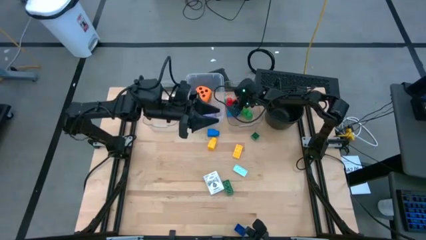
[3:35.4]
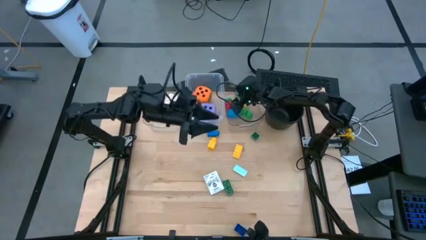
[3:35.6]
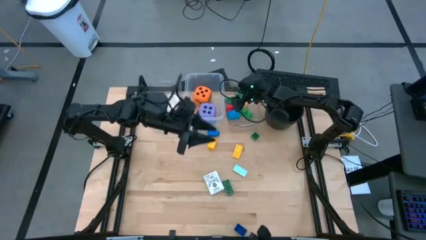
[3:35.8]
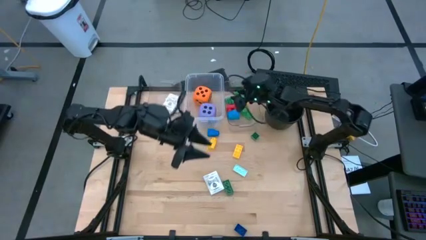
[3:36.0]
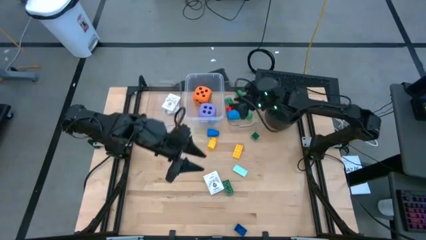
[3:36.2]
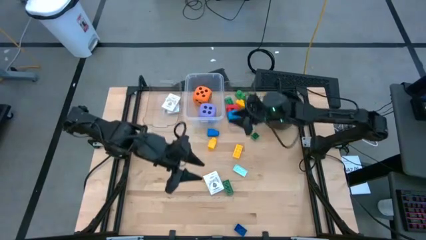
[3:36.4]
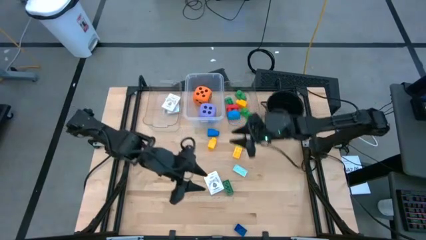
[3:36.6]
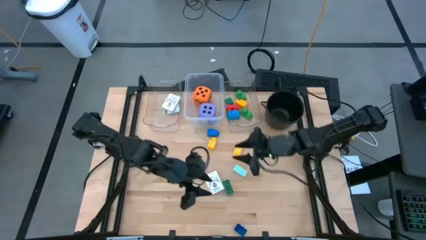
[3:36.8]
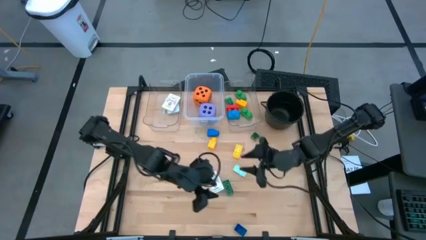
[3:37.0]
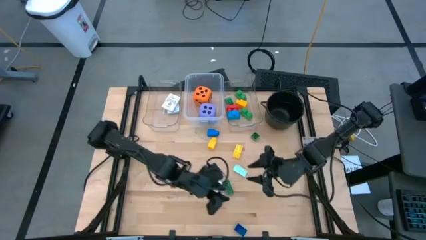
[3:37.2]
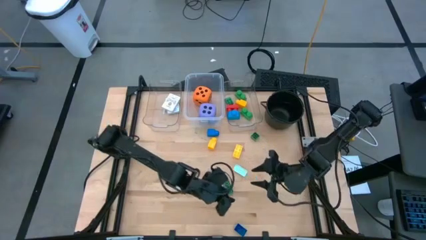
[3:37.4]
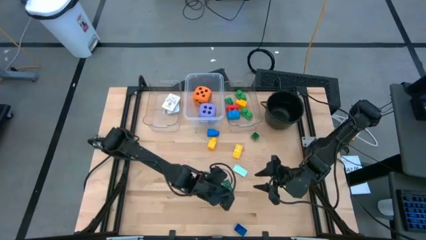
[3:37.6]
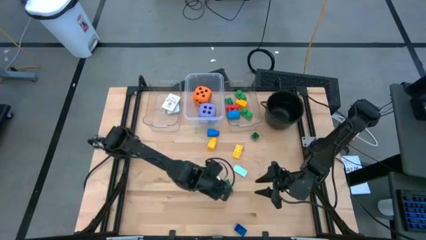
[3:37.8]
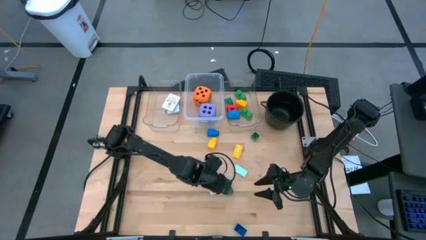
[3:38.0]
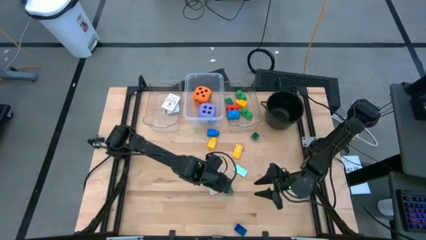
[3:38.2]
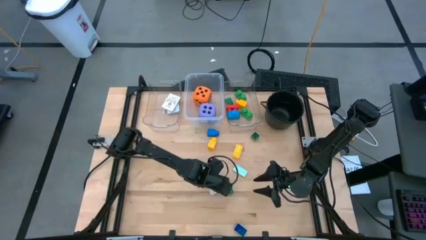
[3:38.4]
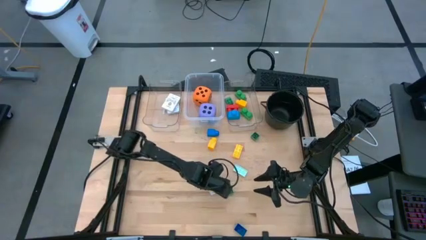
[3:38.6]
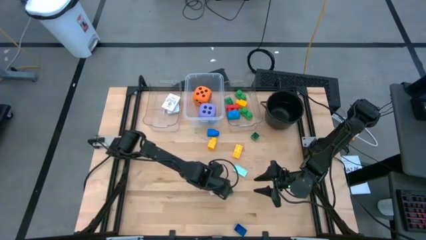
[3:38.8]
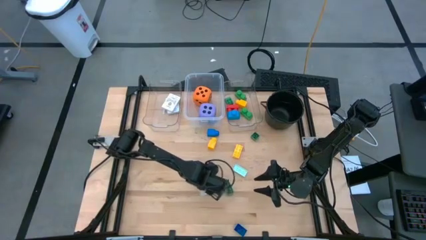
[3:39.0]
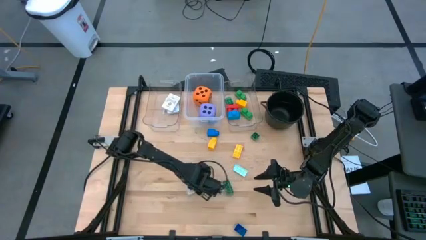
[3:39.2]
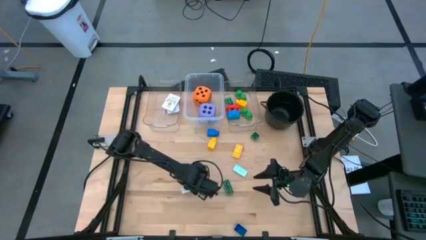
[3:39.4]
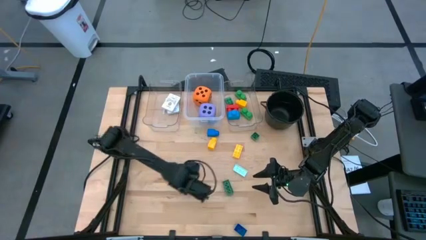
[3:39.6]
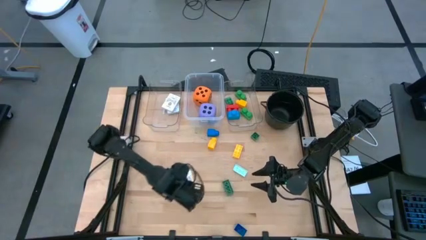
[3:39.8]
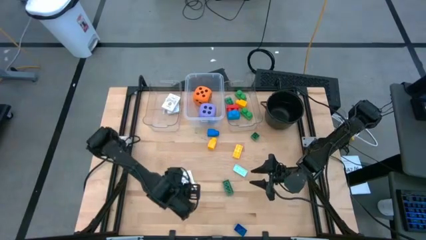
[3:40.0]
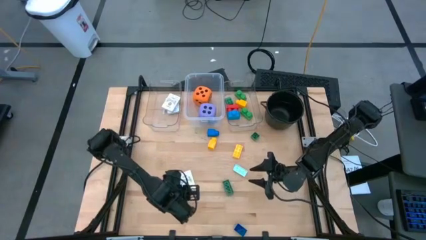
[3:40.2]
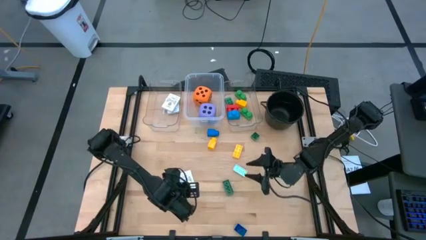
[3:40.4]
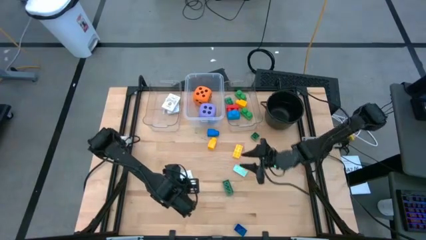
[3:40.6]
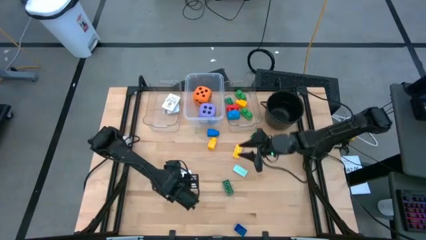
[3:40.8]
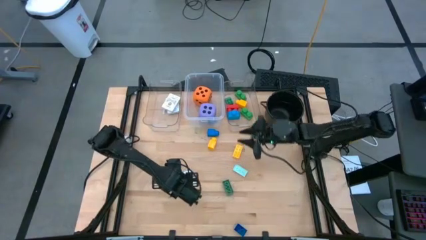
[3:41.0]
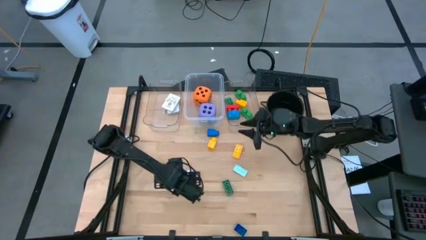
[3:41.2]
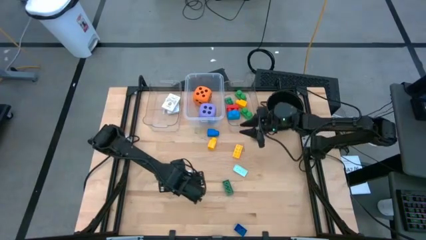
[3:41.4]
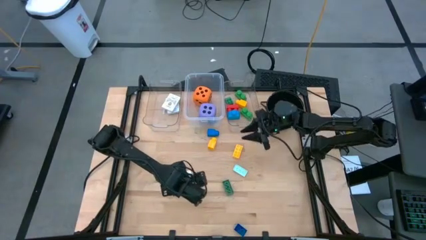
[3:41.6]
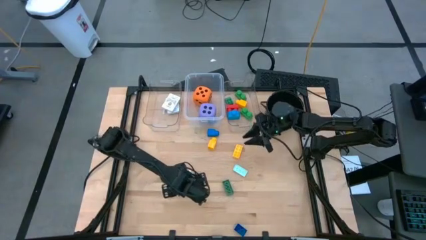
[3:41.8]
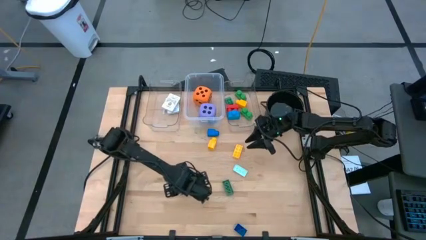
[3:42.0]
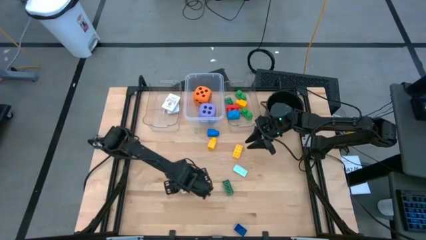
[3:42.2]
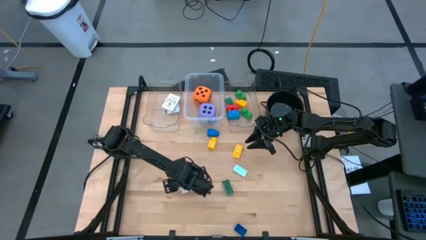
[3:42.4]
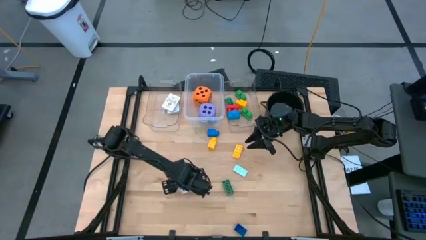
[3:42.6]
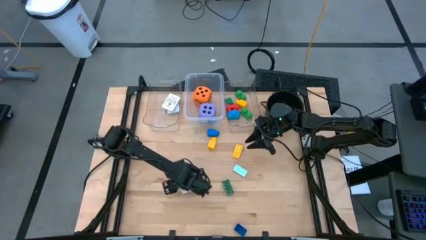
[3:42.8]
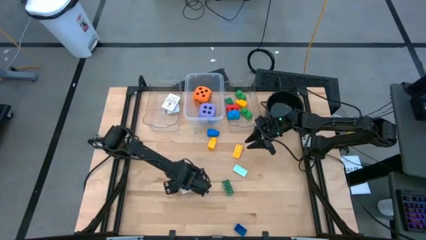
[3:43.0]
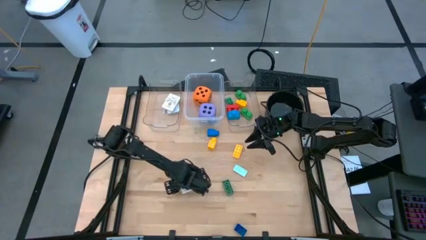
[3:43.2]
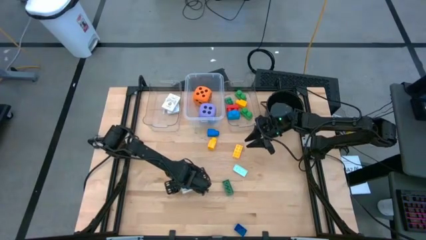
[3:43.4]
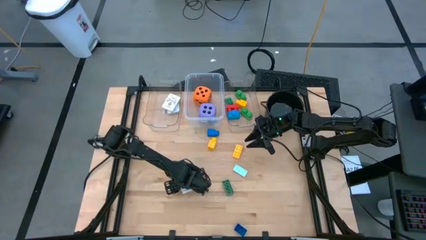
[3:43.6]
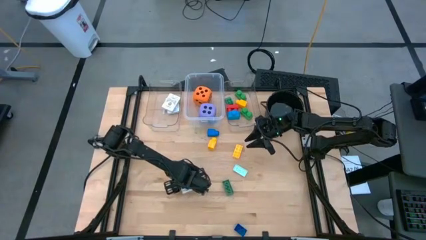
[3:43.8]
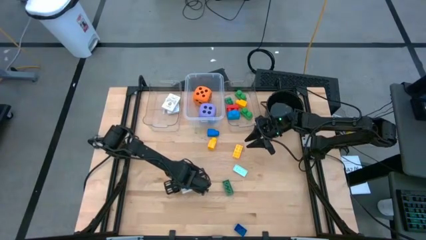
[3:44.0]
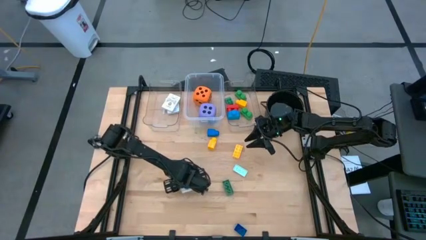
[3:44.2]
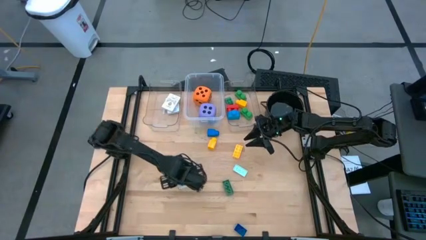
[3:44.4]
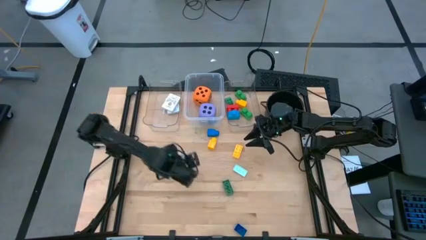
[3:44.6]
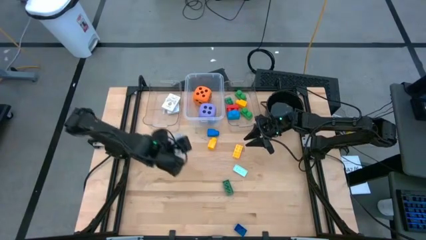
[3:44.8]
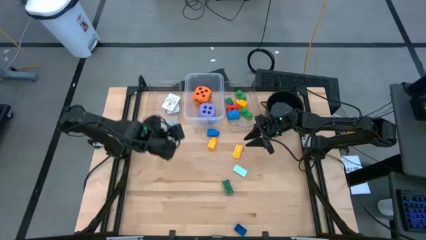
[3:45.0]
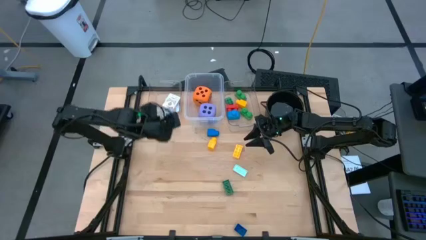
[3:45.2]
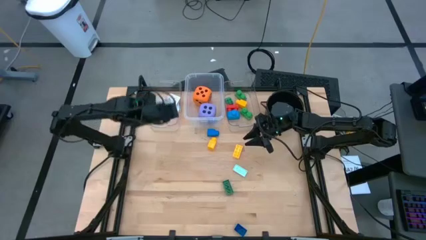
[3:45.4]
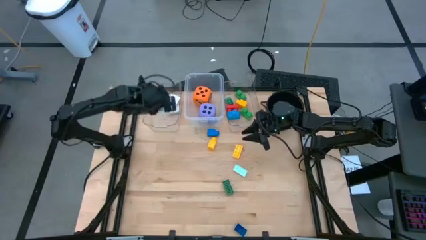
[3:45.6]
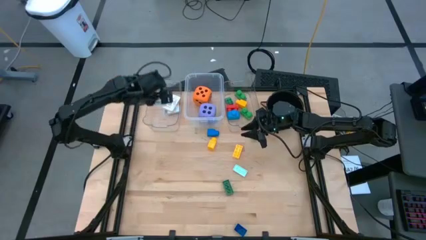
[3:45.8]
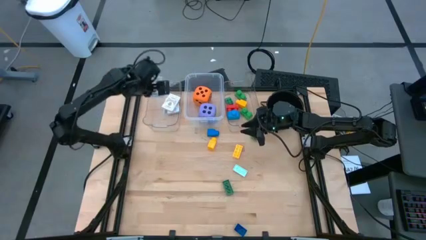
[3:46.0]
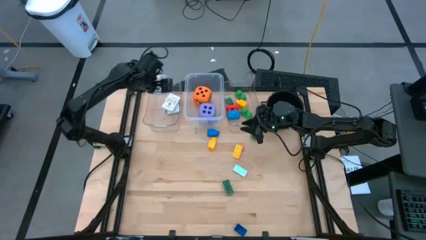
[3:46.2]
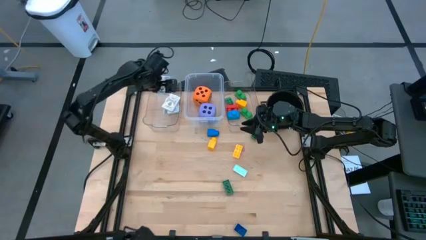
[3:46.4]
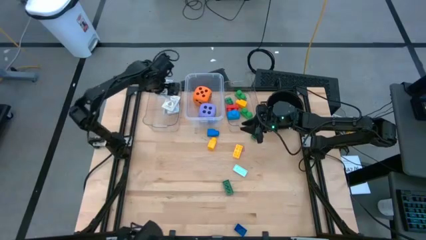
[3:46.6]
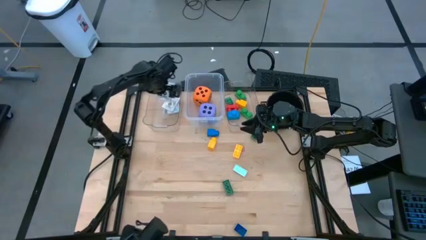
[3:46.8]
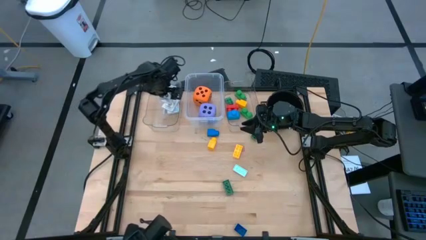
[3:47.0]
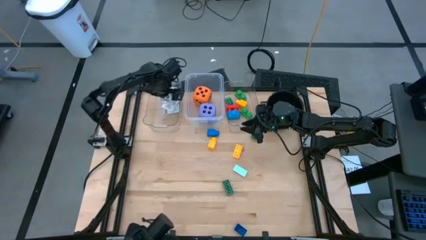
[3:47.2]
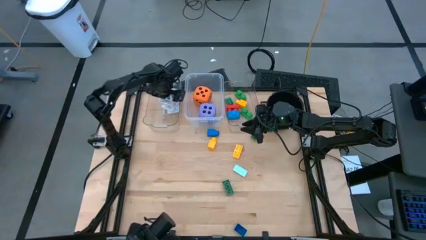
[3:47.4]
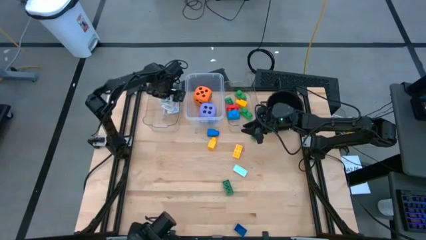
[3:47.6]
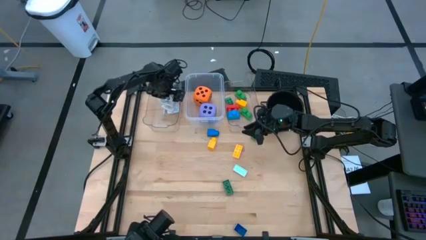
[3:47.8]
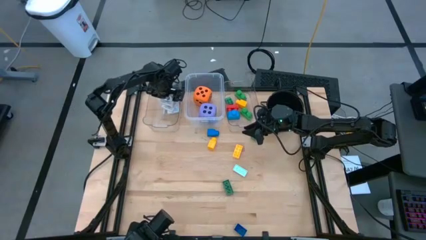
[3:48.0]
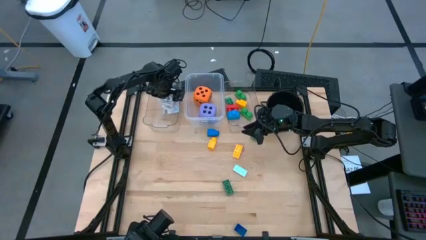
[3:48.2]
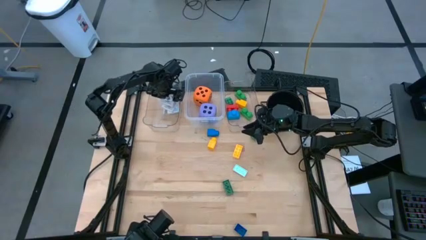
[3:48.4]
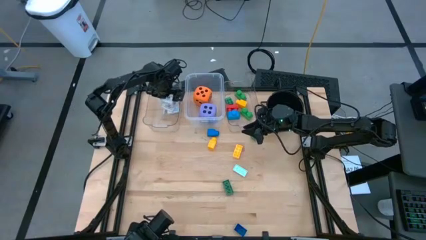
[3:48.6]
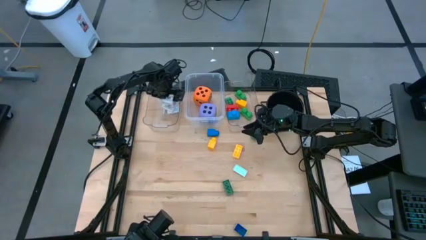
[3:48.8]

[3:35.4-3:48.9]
Task: Pick & Place Toys
Put the black deck of cards into the left transparent bin
